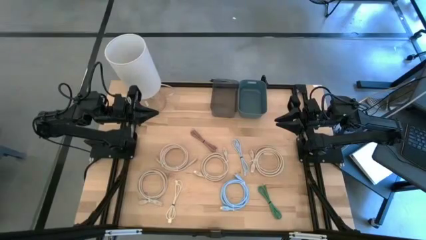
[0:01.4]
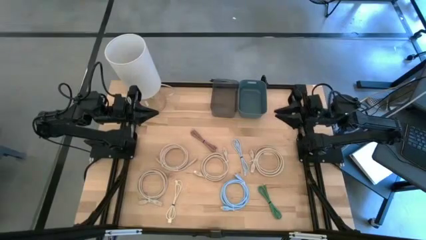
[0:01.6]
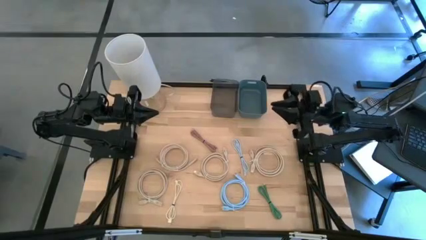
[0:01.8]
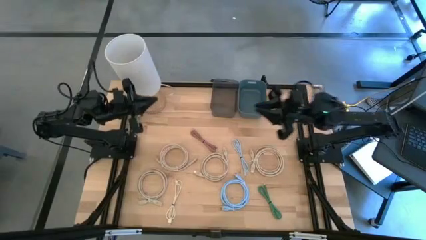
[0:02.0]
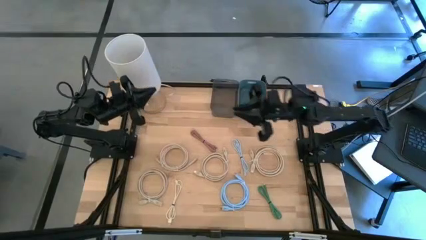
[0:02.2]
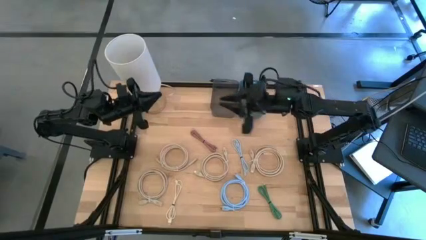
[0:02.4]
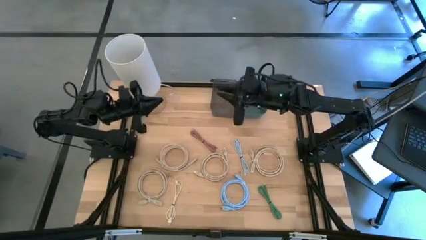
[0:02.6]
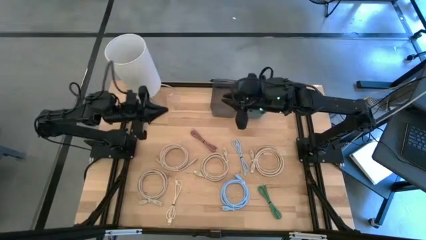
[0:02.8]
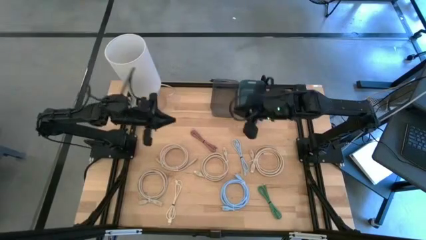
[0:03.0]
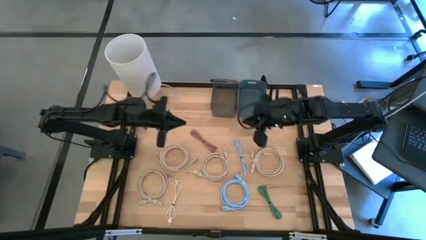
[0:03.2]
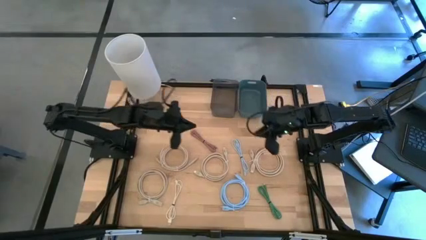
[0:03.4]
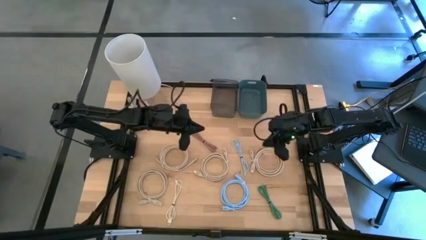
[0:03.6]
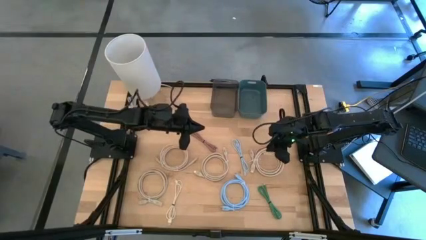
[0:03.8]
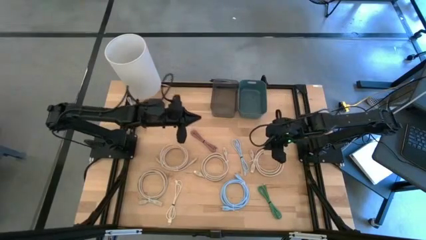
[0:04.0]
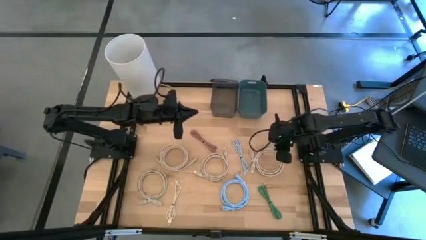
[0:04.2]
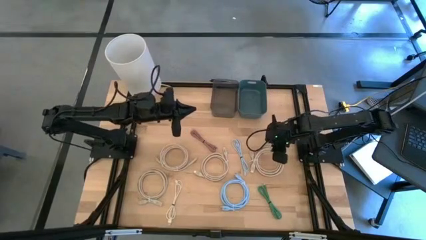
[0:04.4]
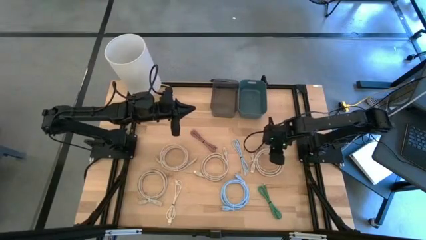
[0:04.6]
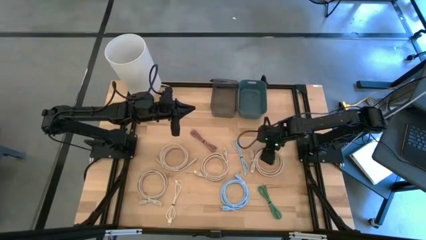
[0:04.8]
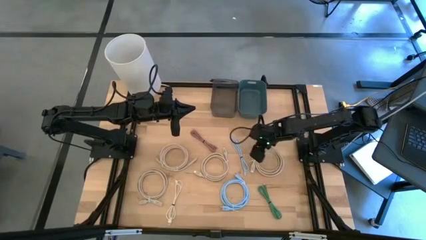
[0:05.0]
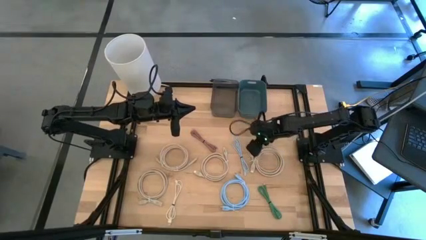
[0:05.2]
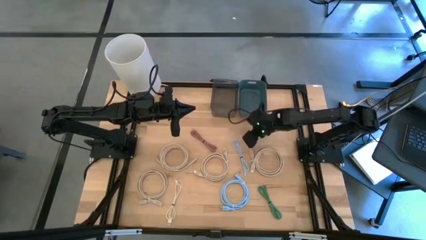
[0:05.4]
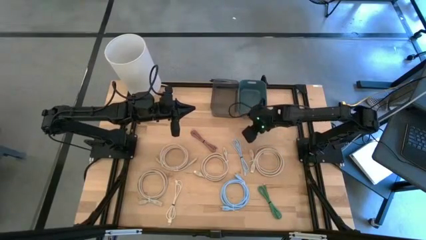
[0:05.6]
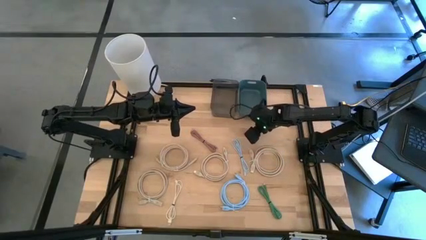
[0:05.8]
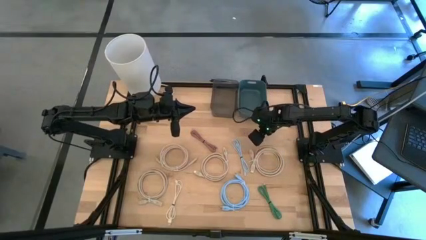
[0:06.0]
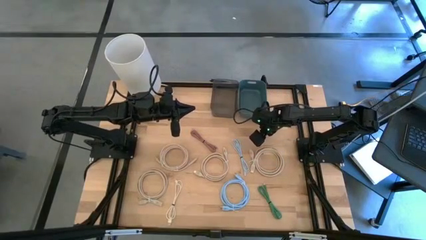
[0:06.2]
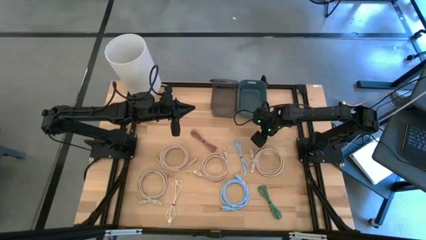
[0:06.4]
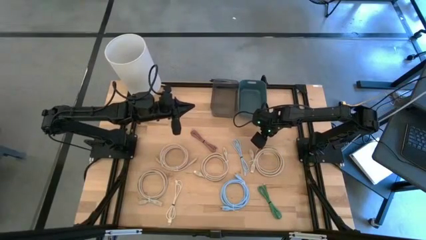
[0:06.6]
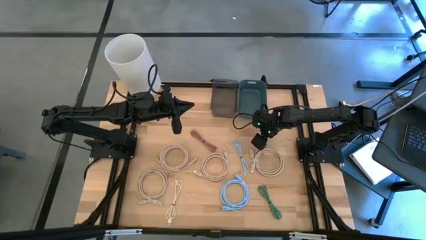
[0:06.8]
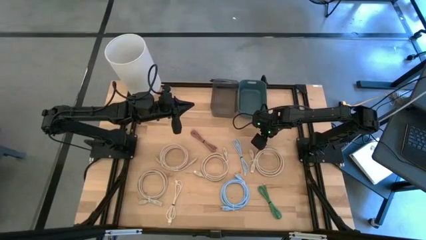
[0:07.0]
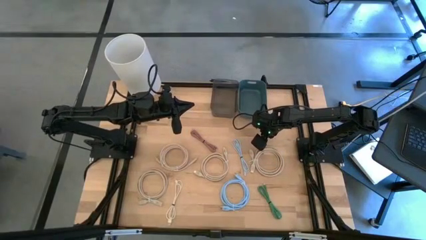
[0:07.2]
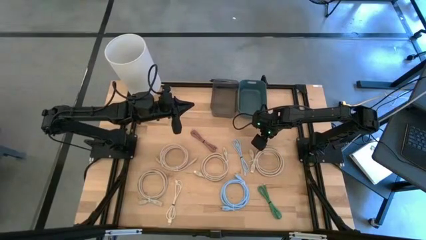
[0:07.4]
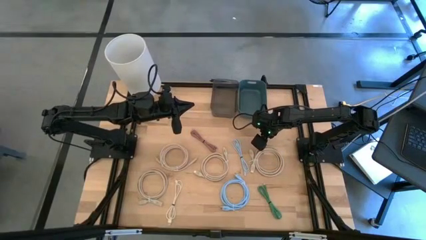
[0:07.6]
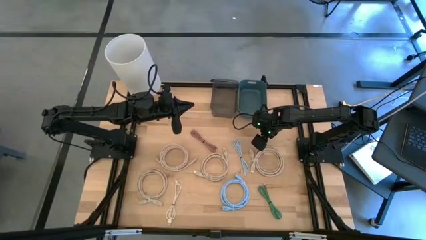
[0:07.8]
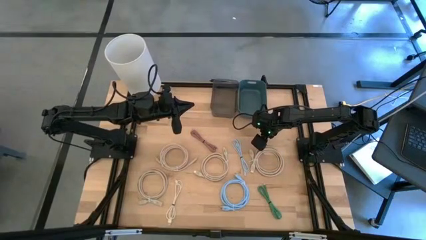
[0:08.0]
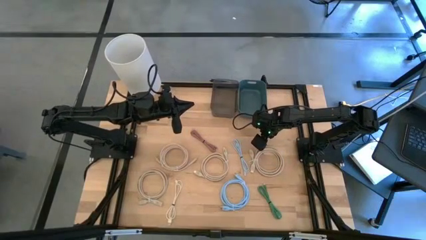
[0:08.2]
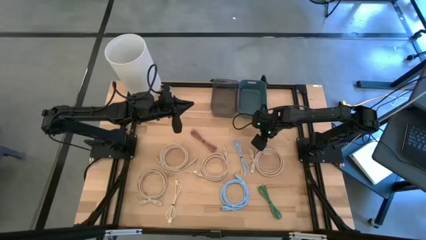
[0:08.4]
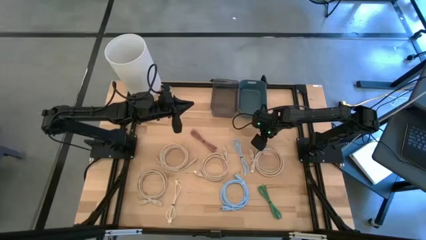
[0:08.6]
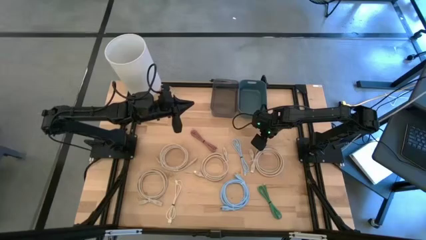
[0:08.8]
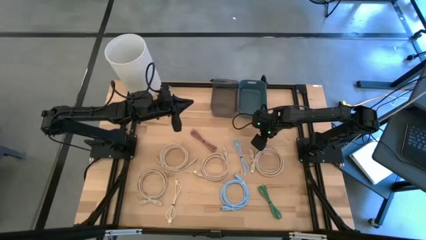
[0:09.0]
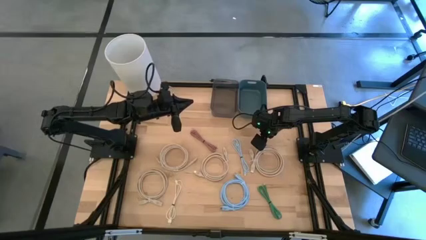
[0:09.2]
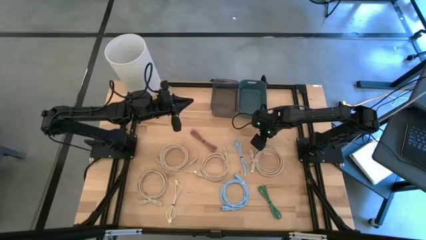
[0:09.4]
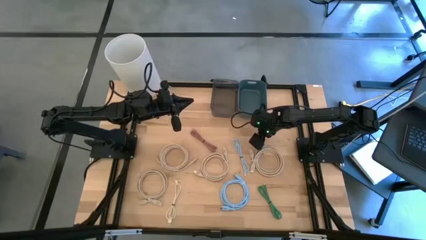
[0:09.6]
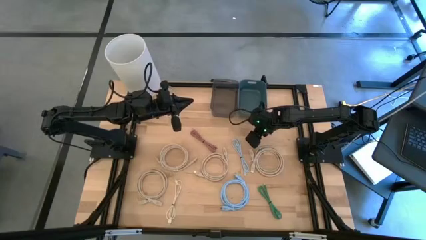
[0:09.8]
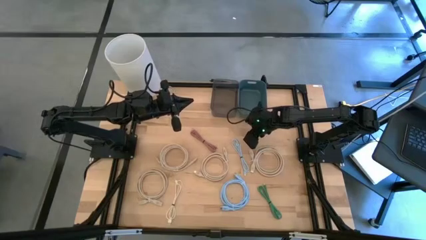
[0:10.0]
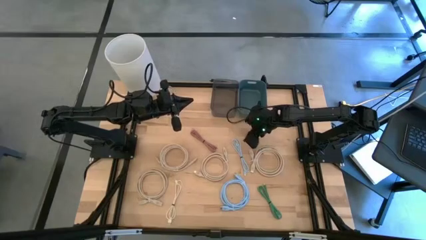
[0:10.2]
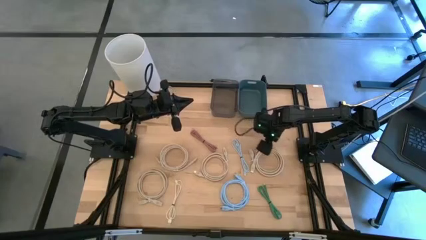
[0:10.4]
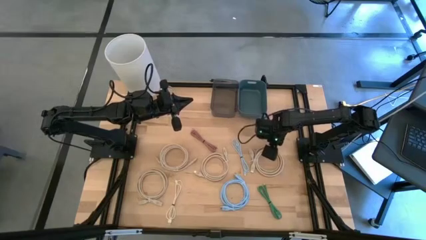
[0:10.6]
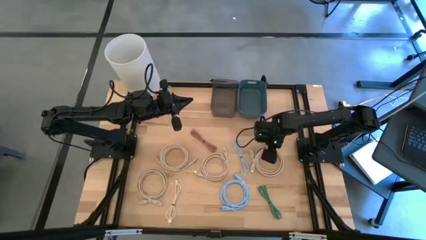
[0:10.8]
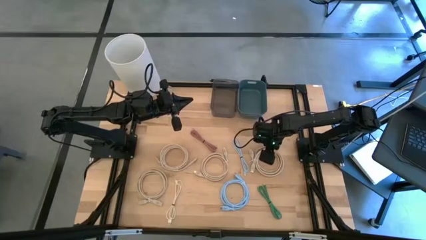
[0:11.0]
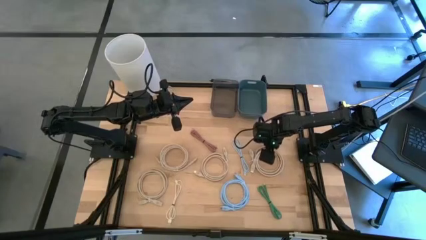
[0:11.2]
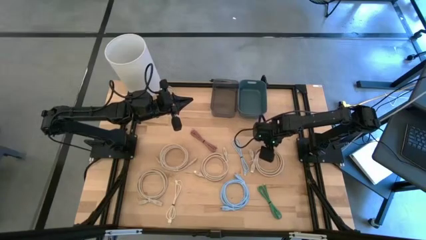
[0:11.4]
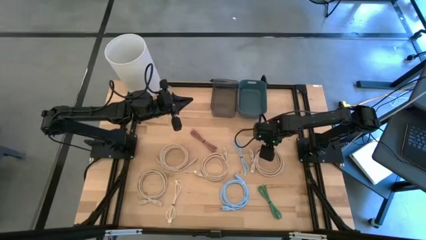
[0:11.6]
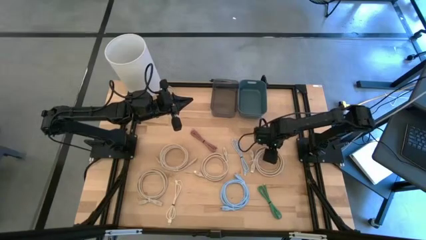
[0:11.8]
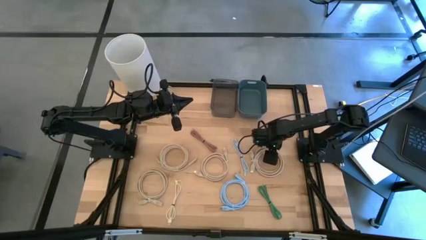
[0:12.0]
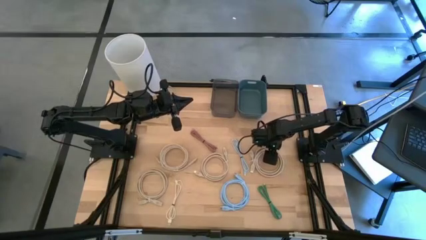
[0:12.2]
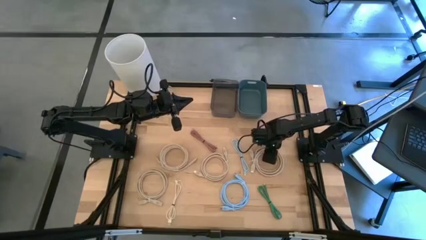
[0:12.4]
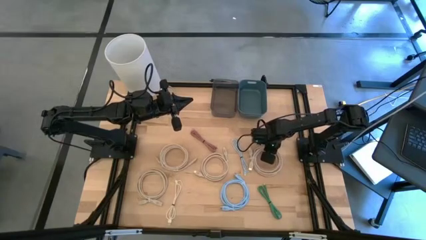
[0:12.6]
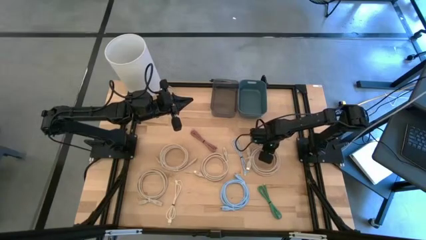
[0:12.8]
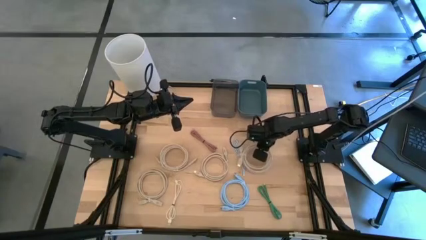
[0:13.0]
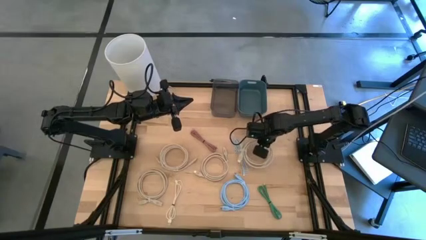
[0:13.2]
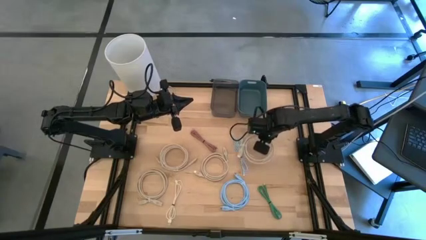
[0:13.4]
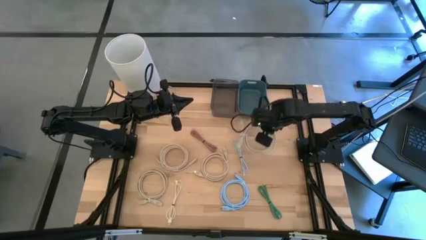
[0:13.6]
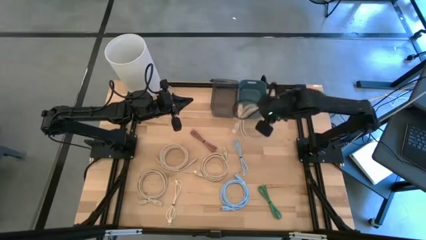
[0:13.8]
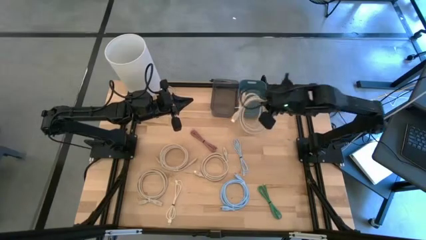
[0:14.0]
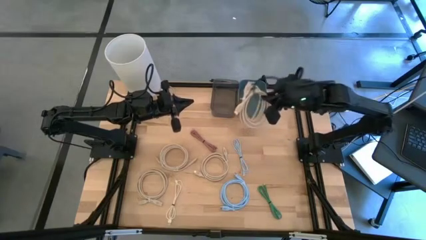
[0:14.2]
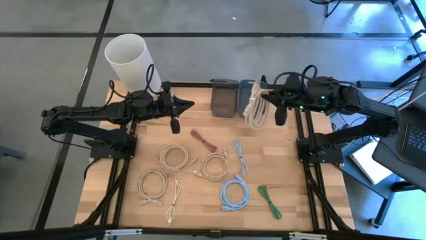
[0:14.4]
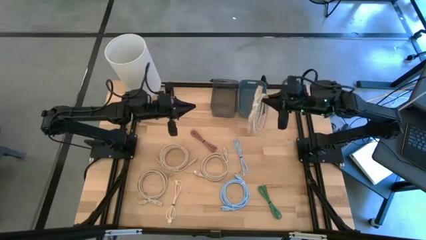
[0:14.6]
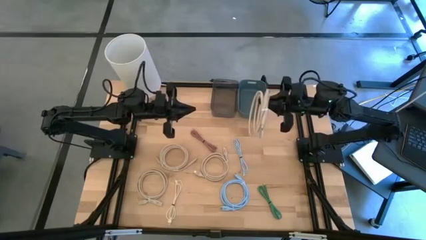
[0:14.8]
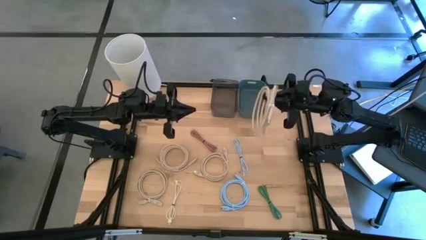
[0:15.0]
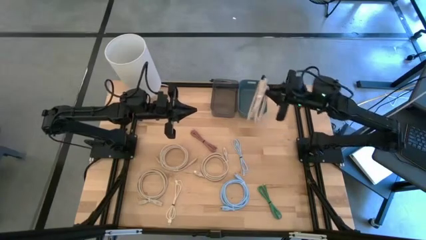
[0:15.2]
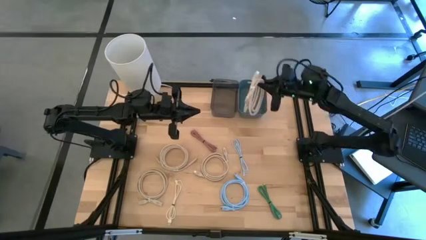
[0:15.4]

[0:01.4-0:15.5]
Put the light brown HDMI cable into the blue bin
